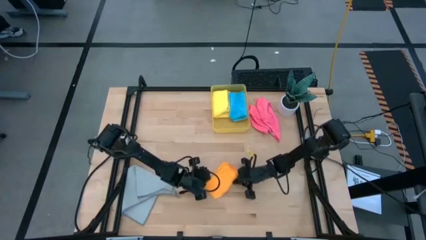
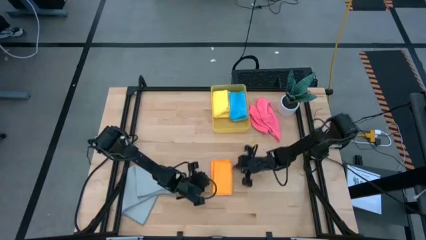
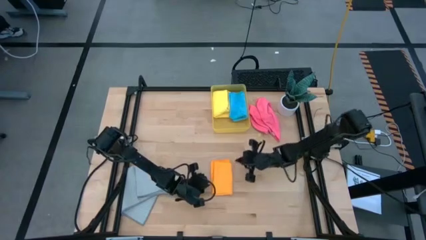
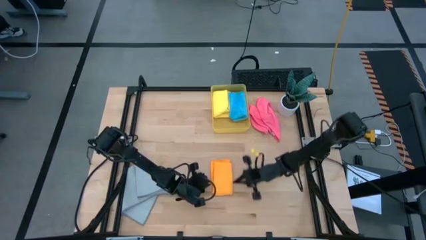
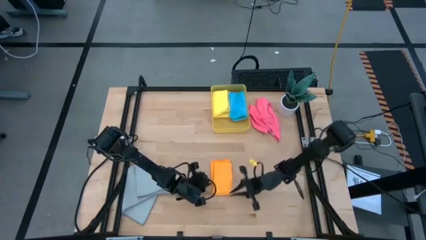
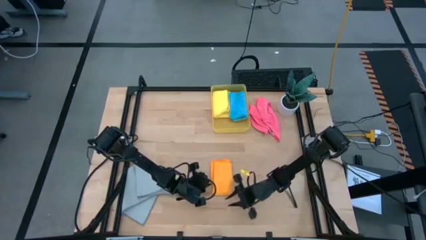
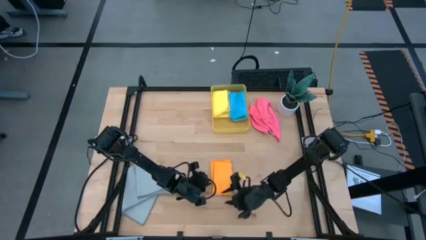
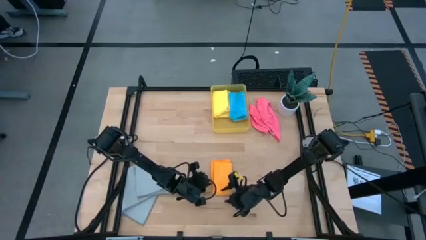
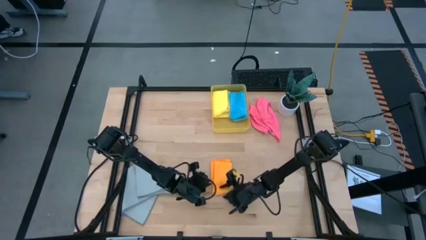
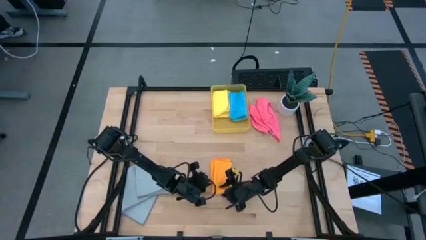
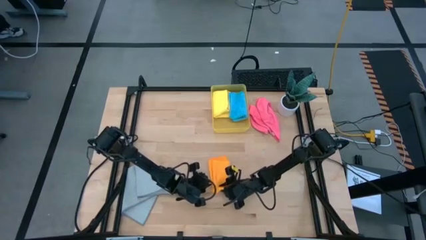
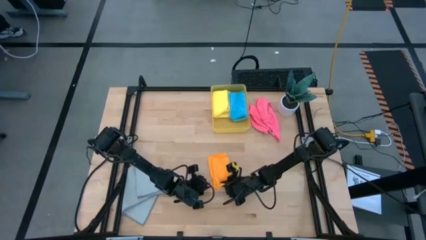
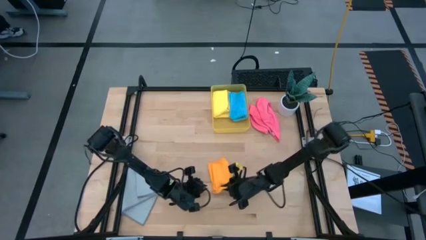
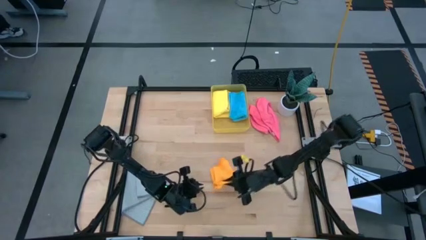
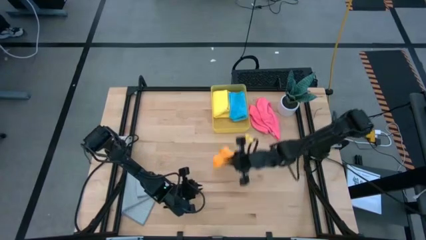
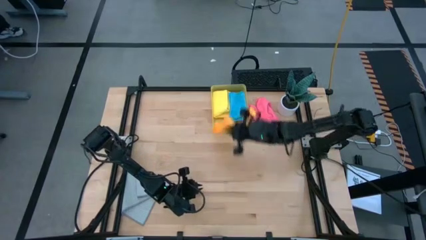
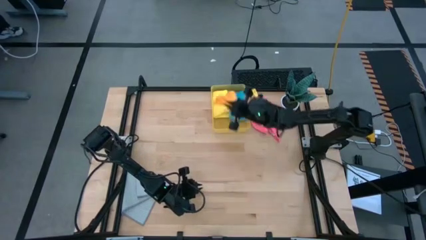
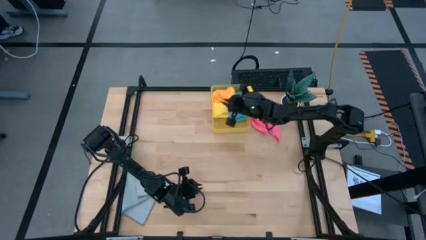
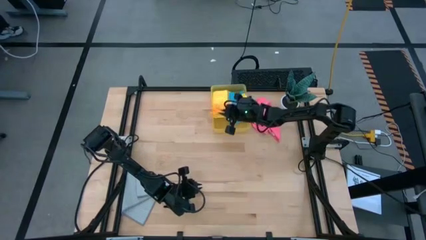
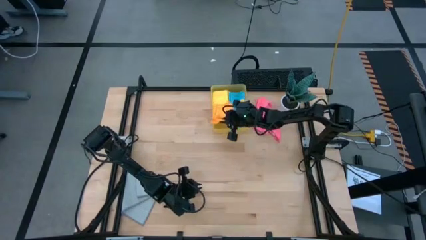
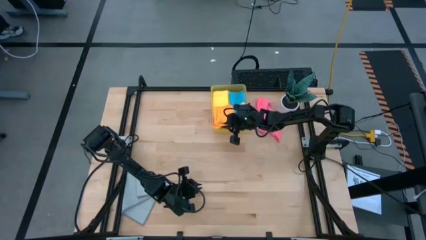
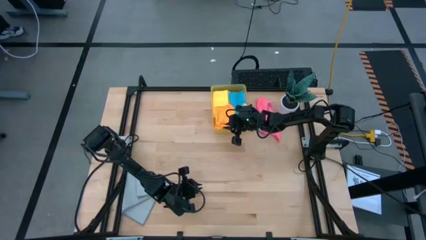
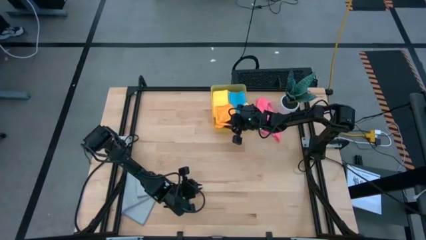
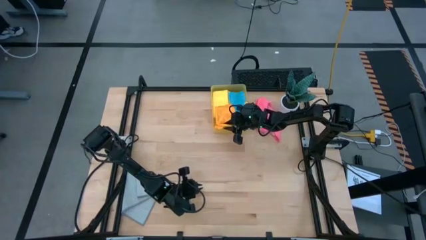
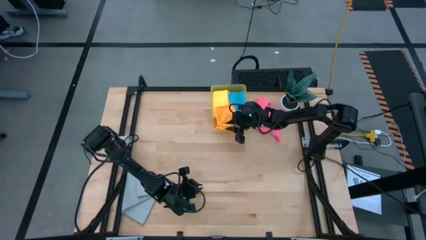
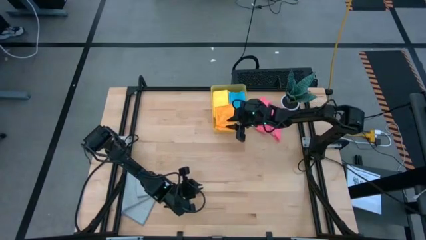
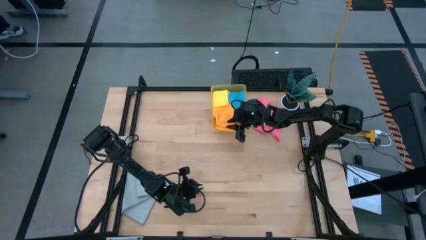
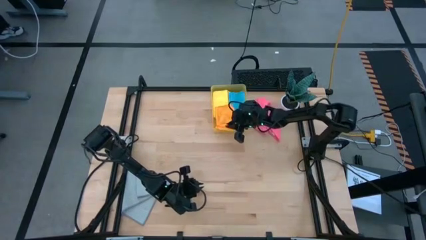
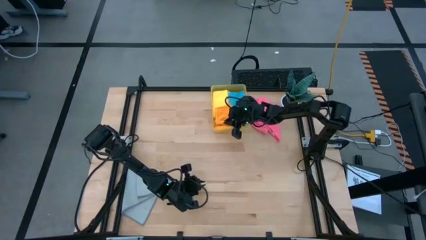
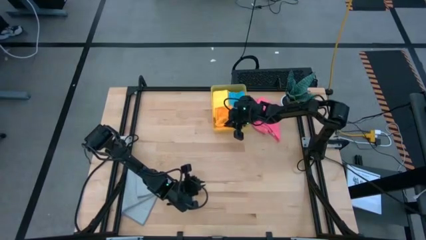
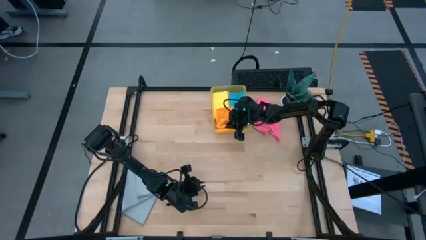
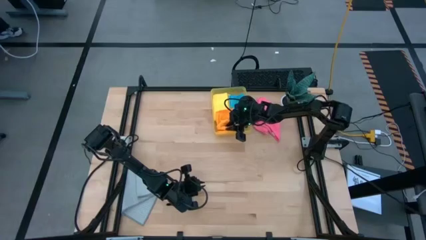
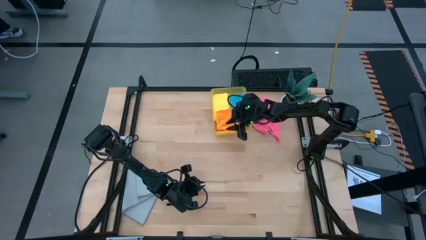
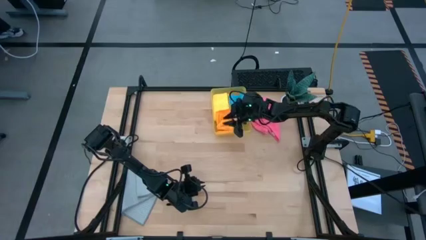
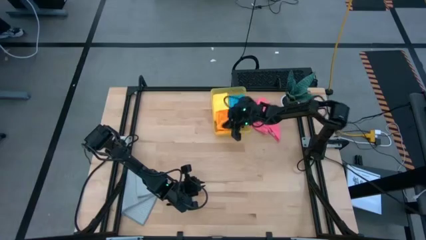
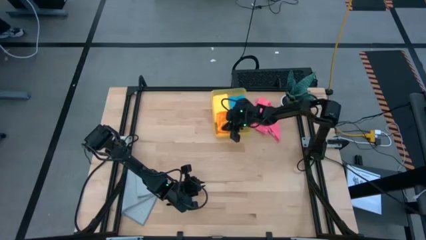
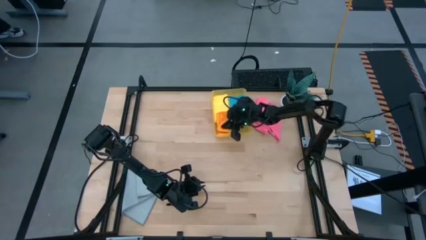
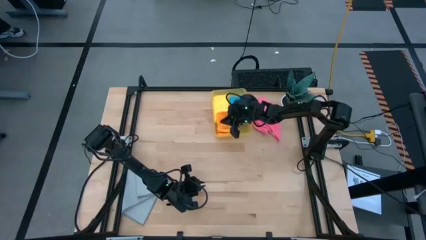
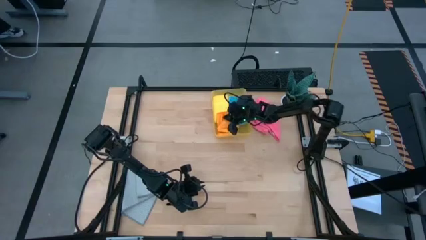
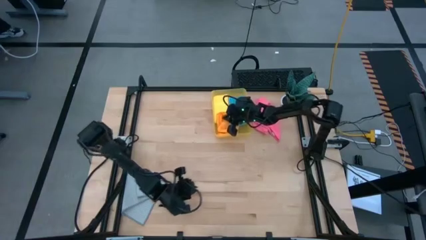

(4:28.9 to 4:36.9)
Task: Fold microfiber towels
Put the folded orange microfiber towel into the yellow bin

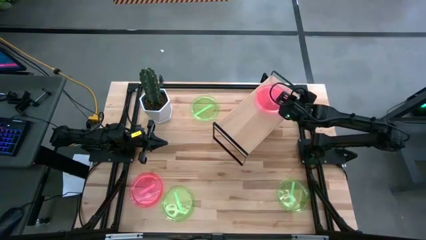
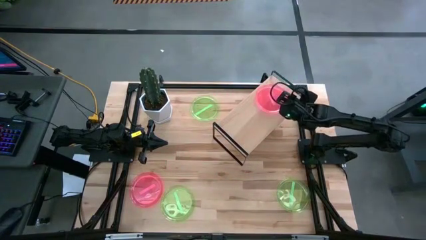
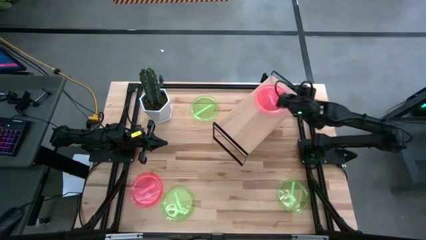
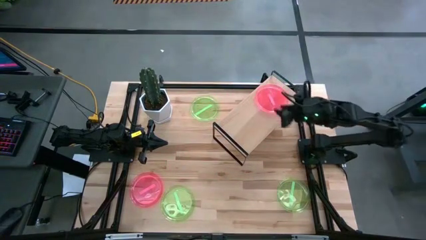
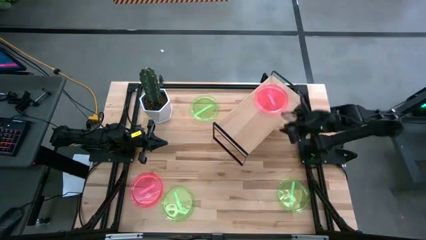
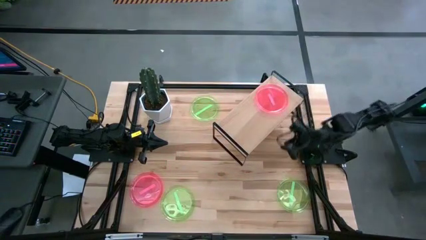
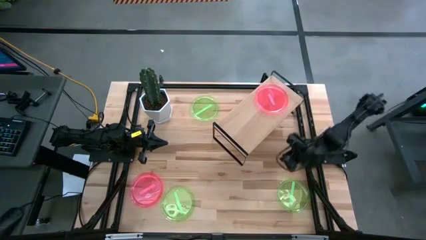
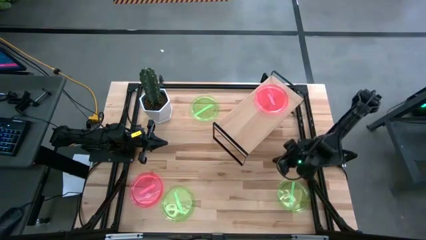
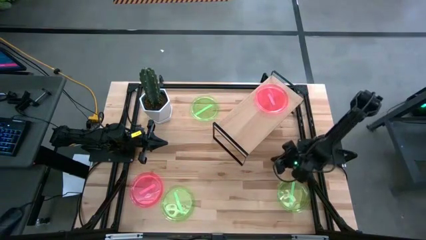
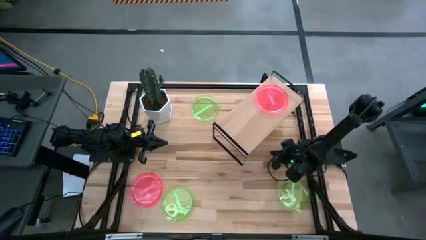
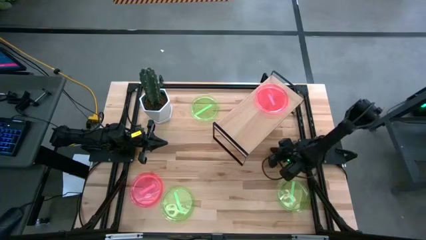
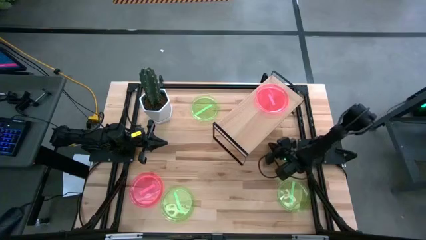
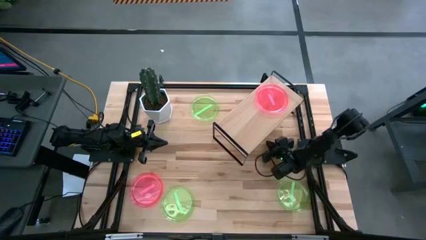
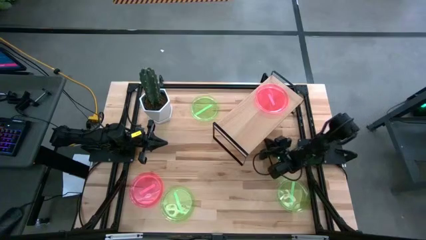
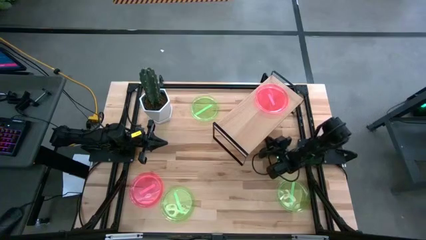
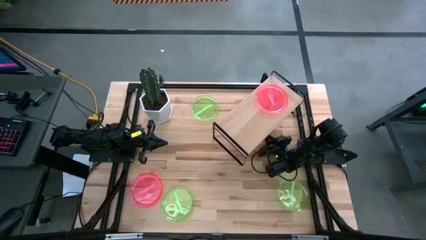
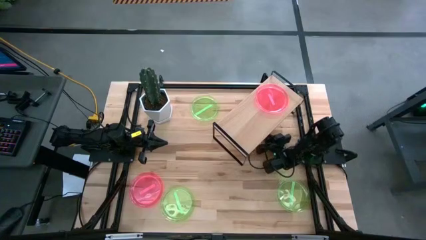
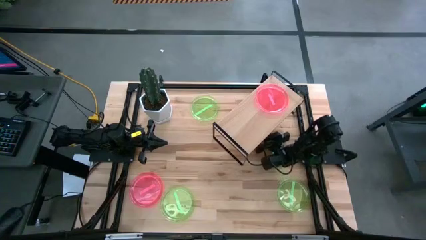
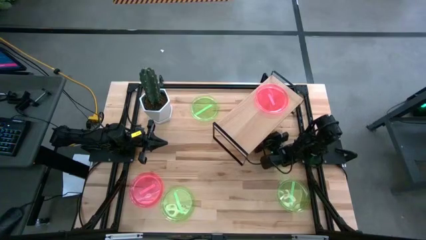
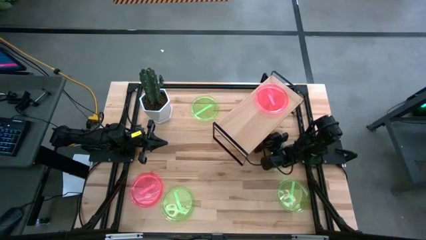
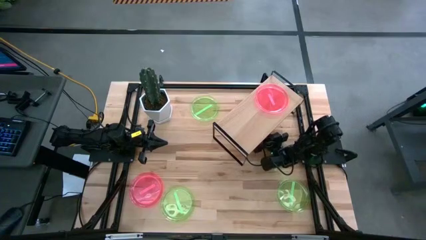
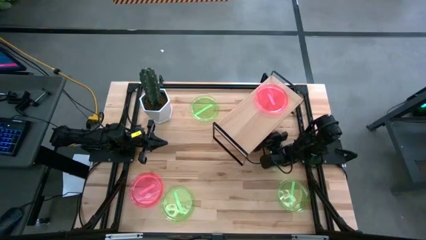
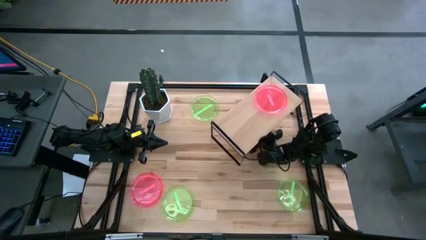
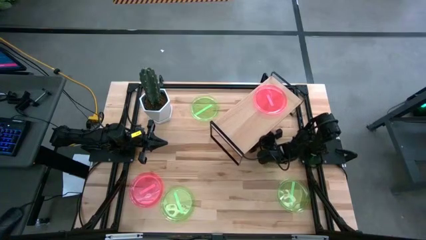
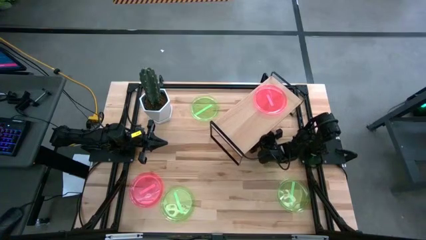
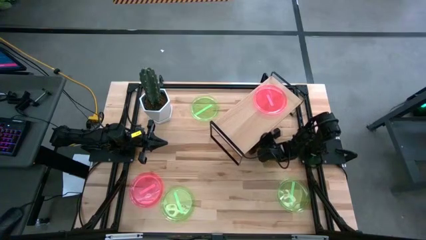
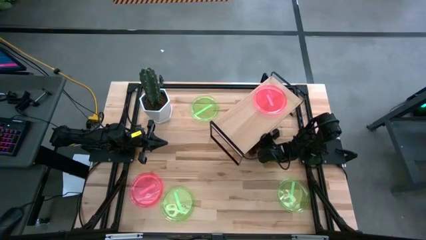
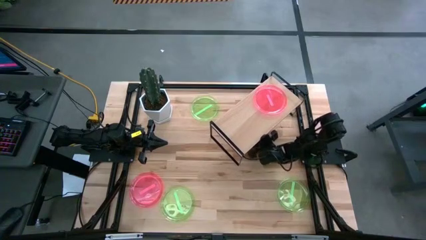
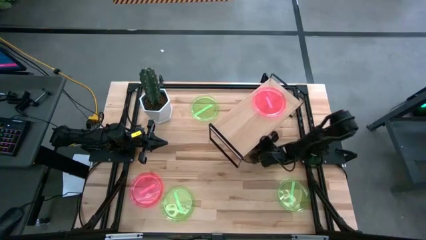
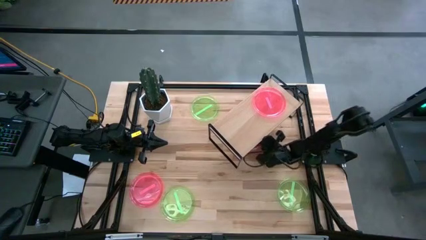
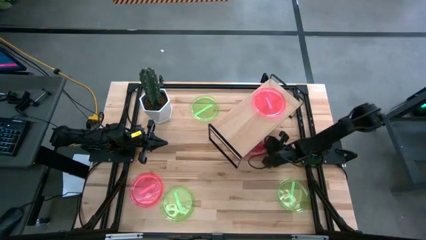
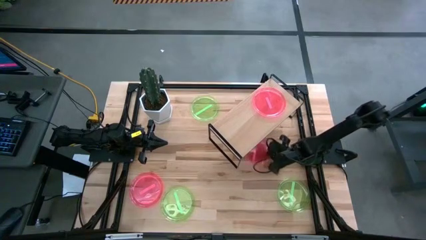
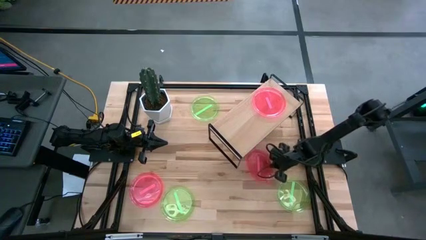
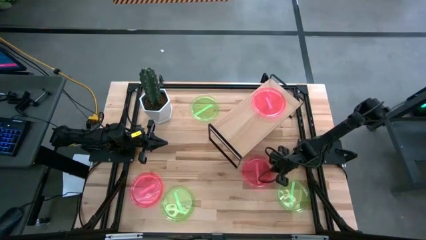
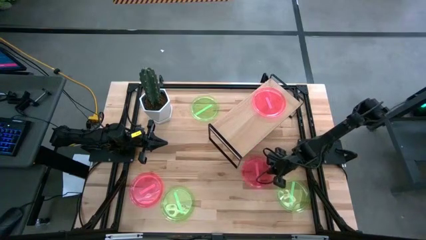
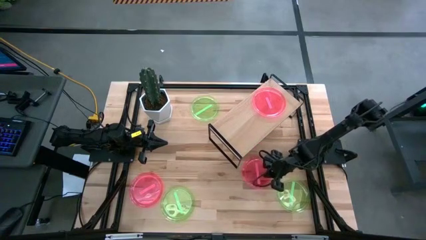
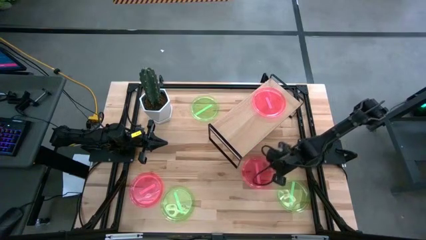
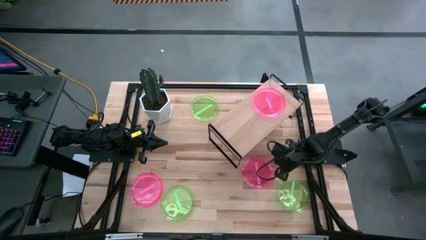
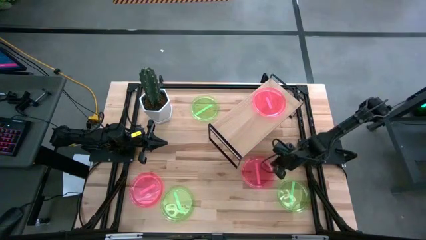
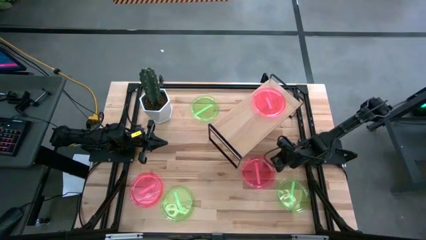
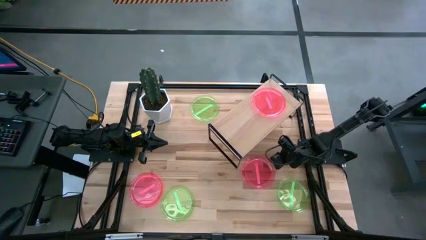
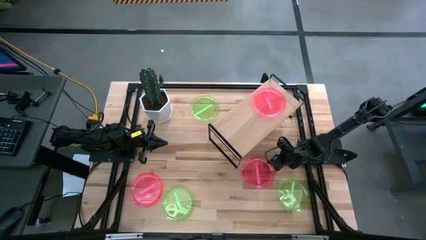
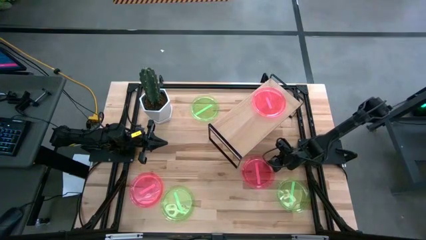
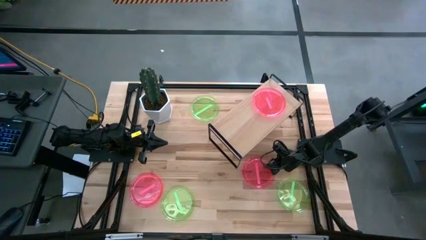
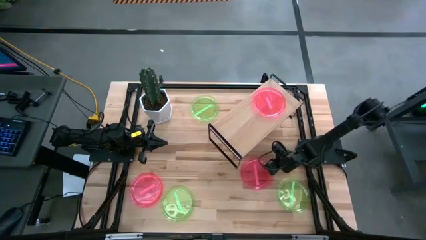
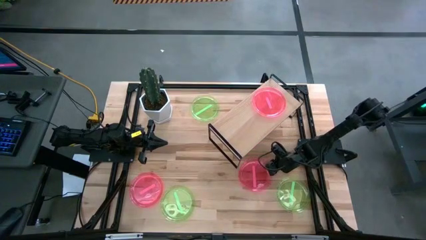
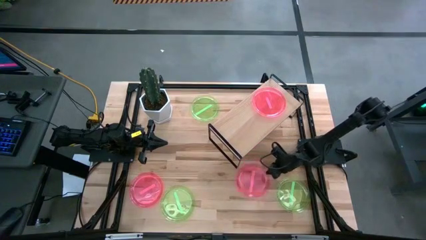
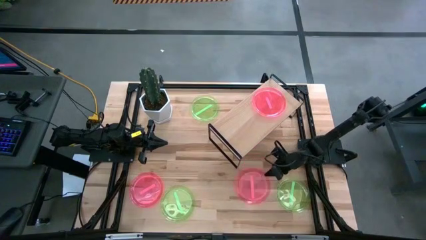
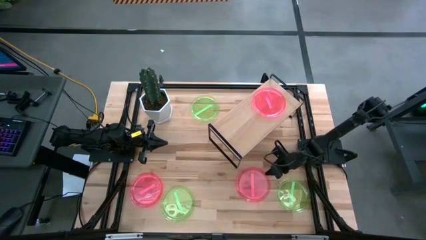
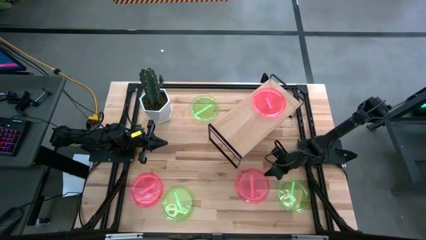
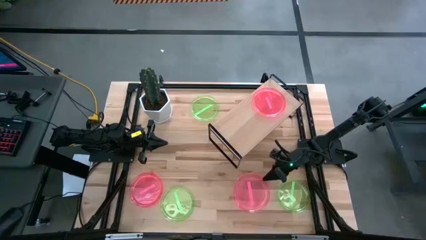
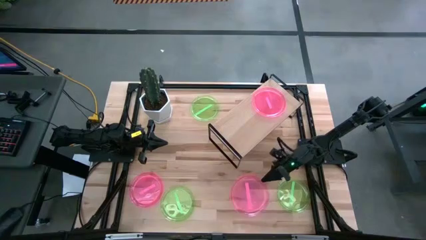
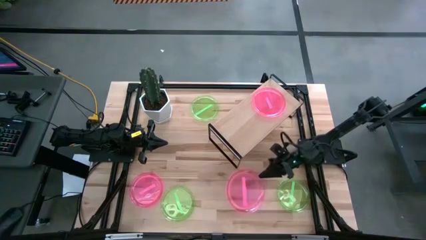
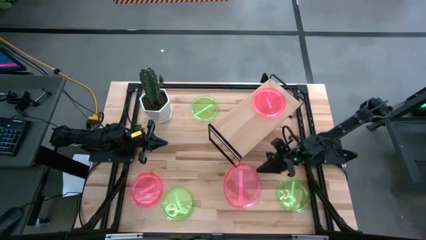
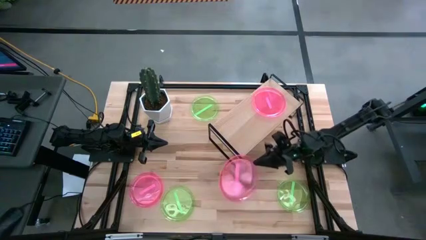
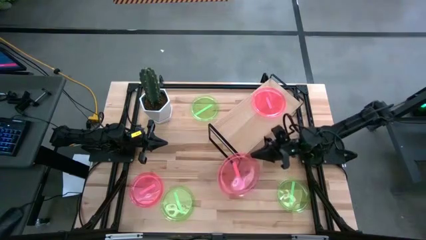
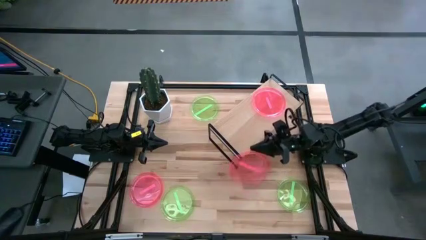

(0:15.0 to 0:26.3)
Task: Place and stack plates onto a shelf
Stack the top pink plate on the top of the pink plate
